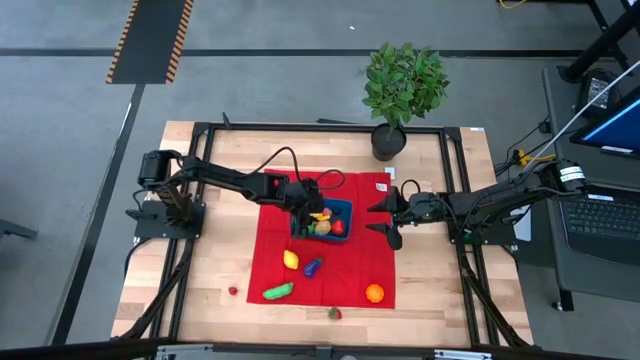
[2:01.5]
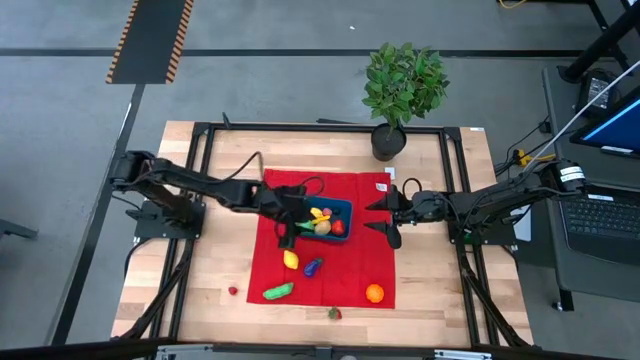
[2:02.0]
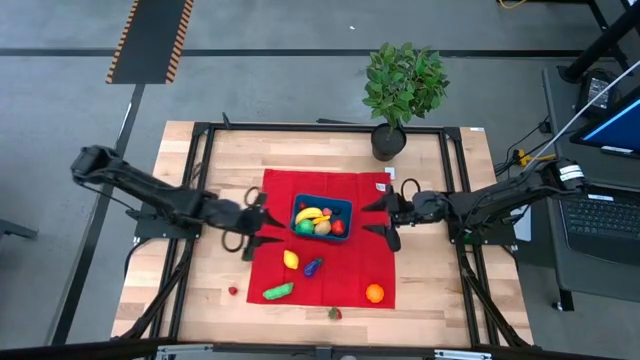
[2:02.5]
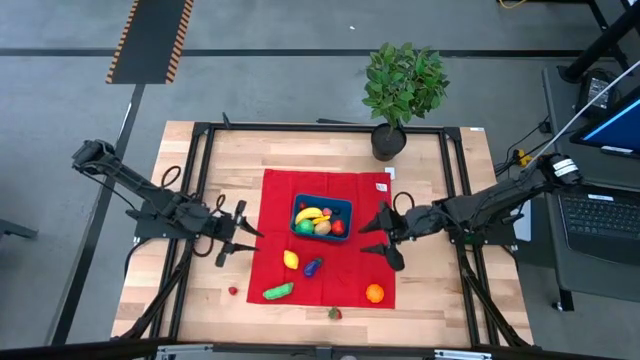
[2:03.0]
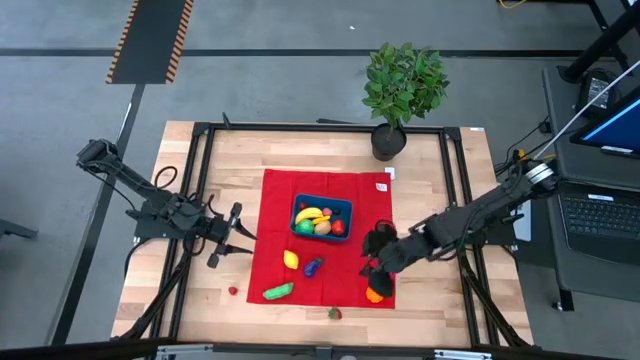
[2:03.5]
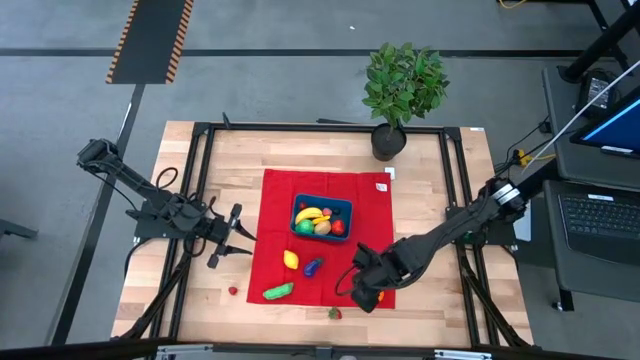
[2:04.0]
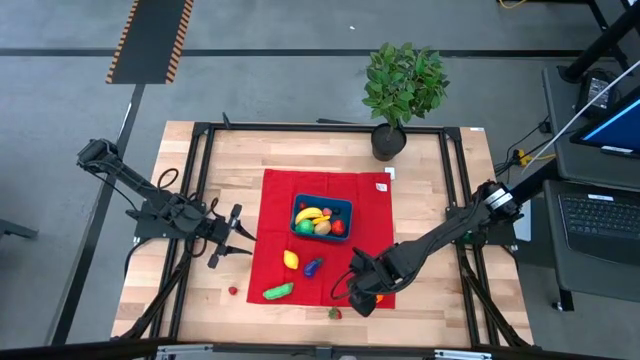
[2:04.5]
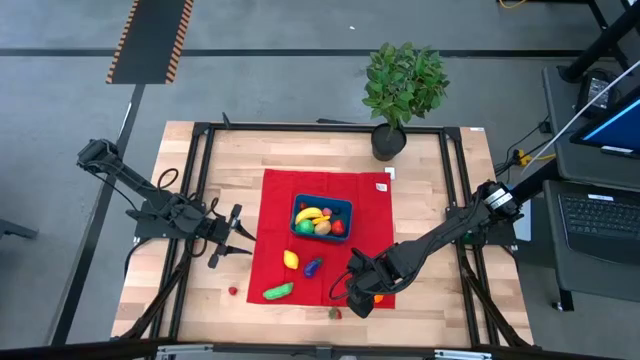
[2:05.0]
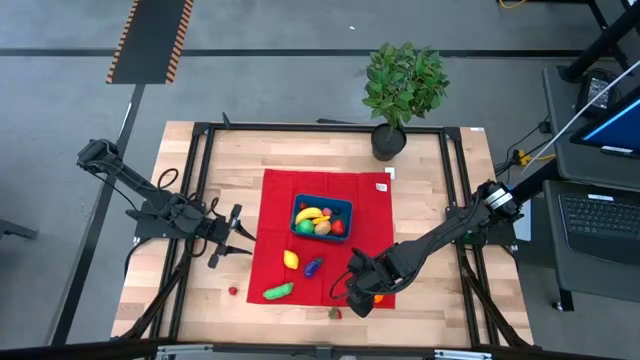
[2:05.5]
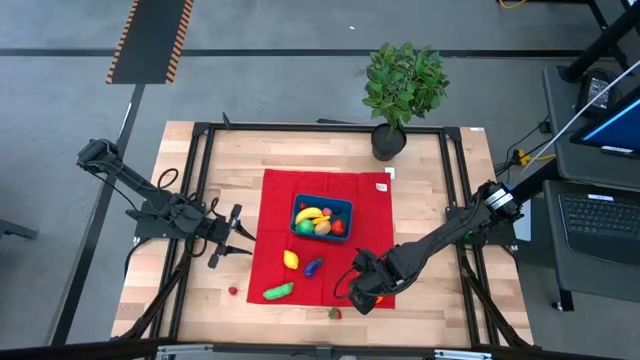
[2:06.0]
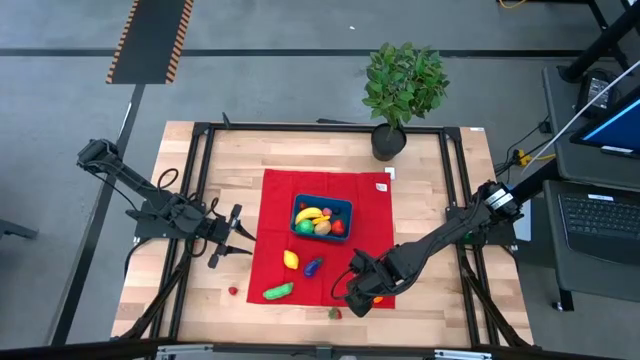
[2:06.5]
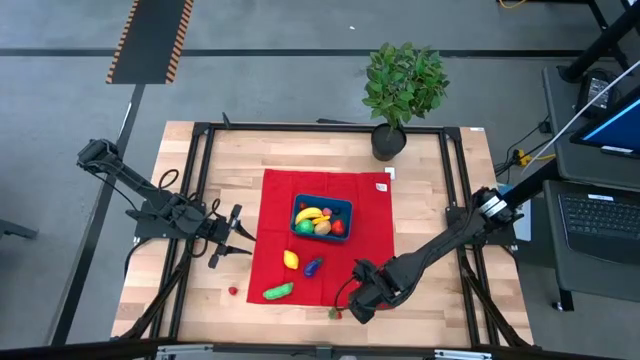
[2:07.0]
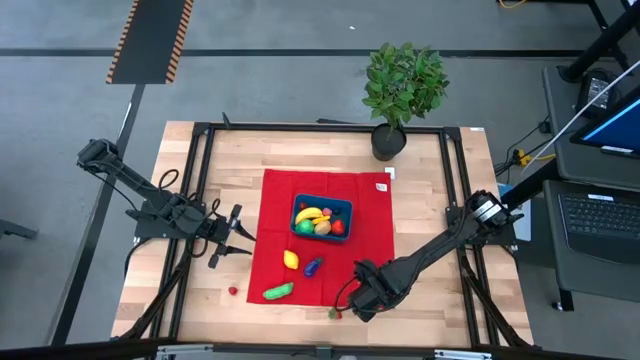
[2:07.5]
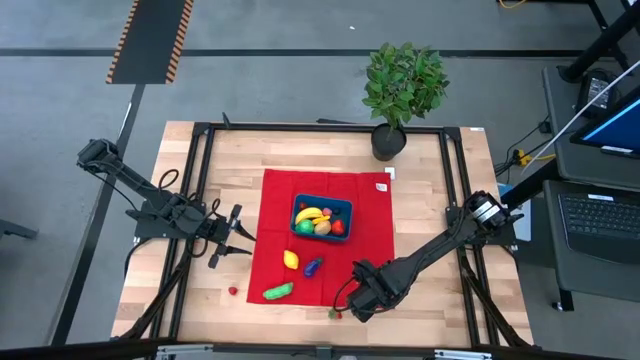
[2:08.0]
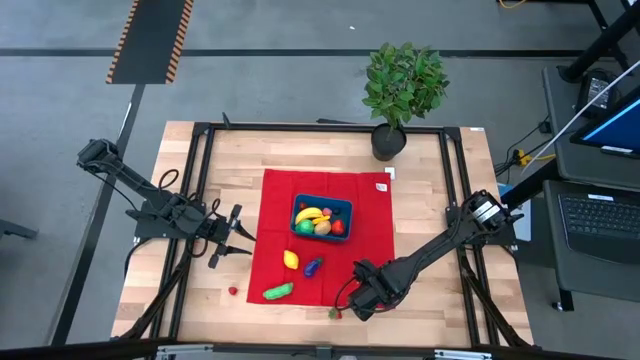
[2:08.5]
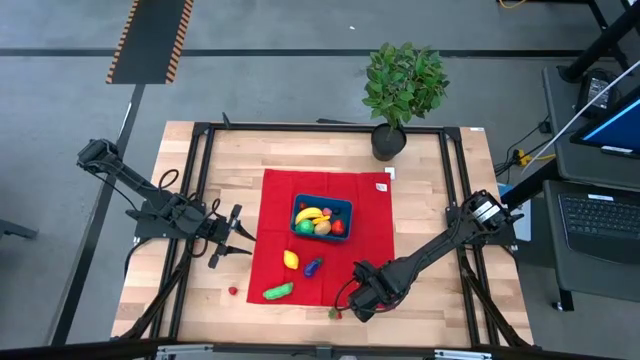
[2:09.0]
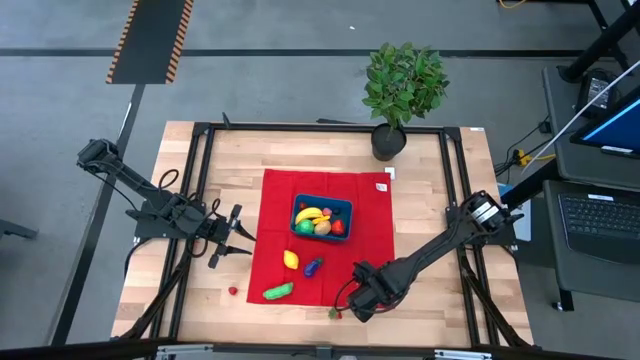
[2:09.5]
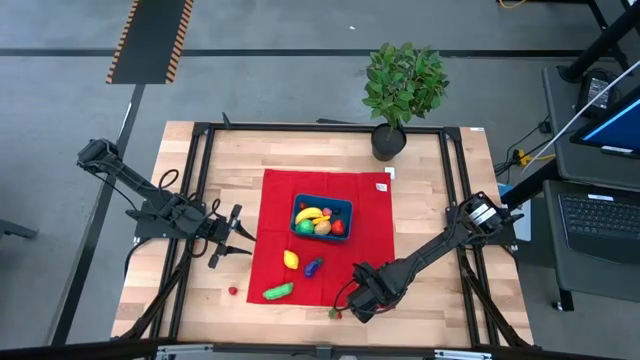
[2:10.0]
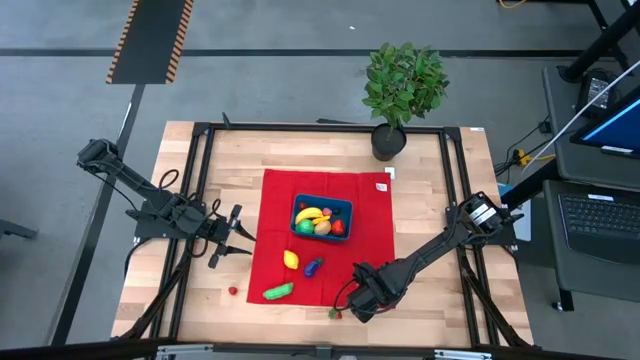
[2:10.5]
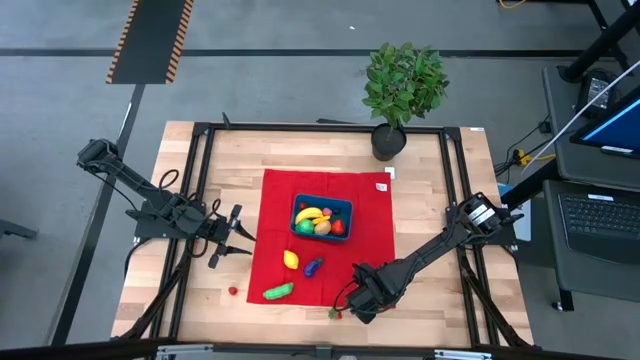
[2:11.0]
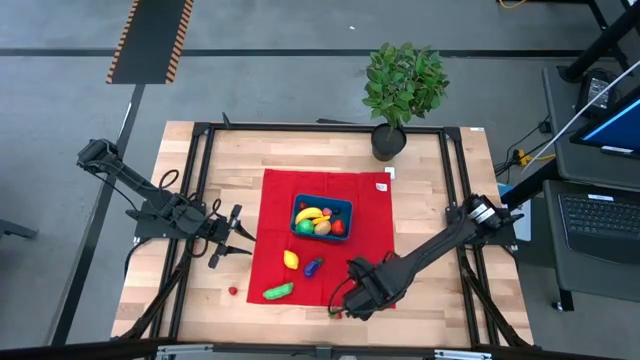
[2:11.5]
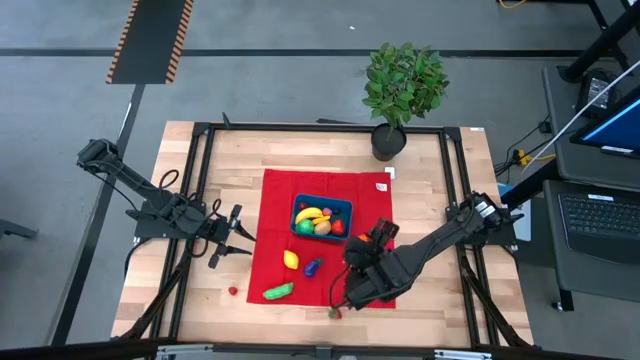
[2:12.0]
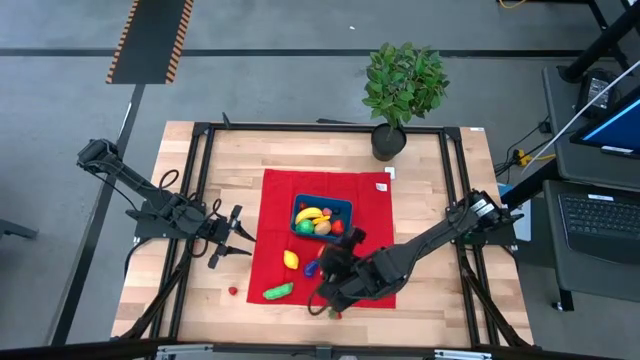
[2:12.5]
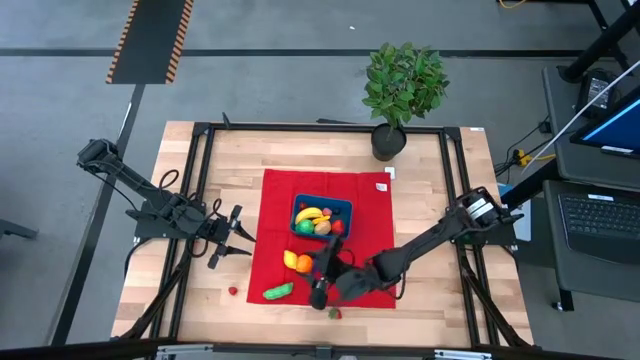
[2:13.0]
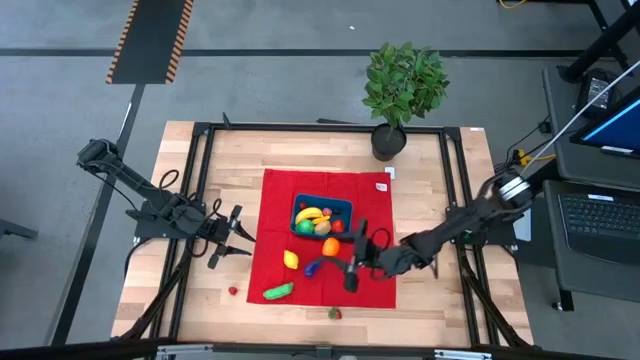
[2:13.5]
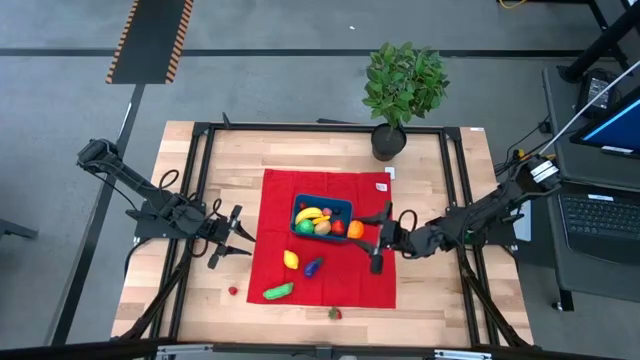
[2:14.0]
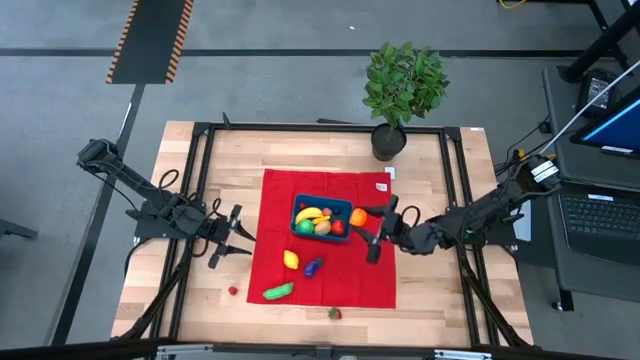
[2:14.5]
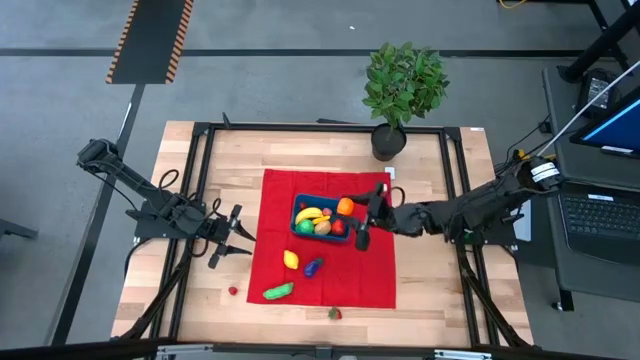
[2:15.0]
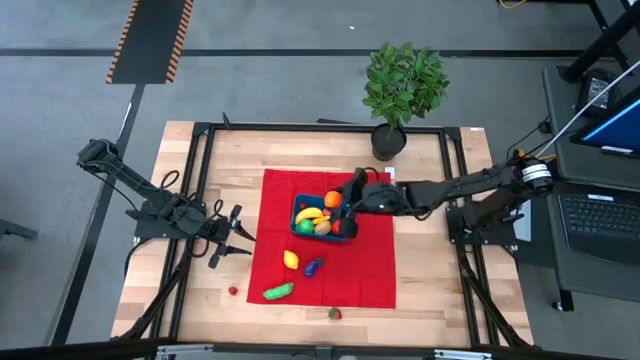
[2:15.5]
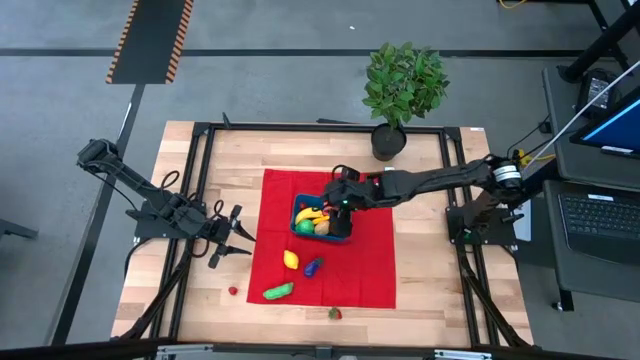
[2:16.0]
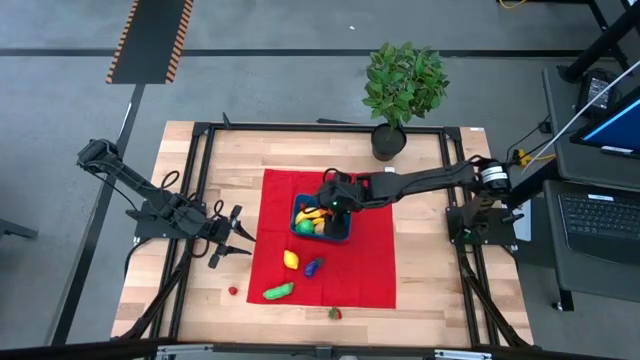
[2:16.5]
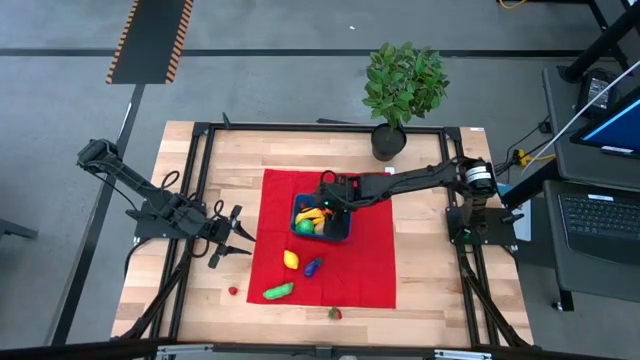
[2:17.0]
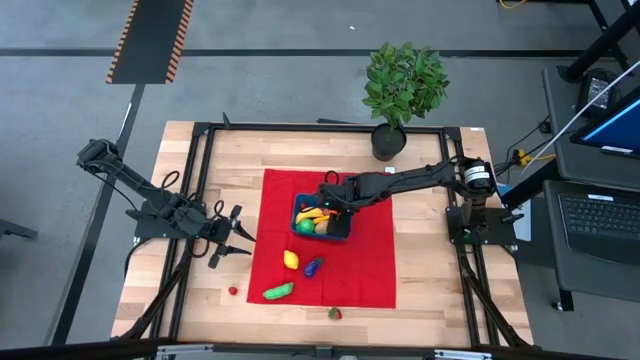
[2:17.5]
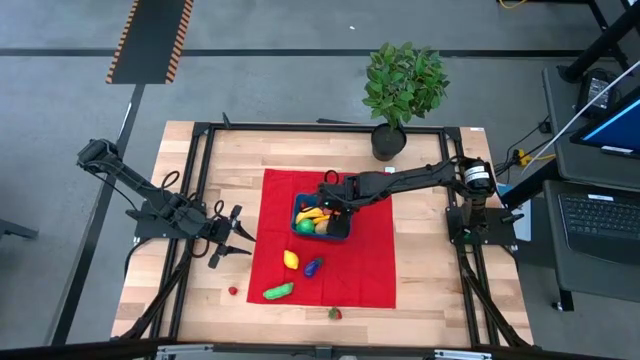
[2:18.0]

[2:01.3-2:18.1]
Task: Pick and placing Produce into tupperware
Put the orange tangerine into the blue bin

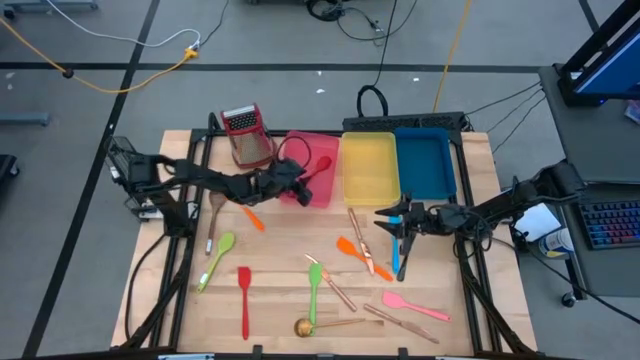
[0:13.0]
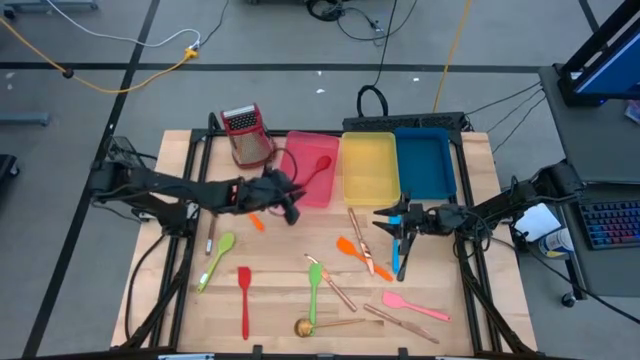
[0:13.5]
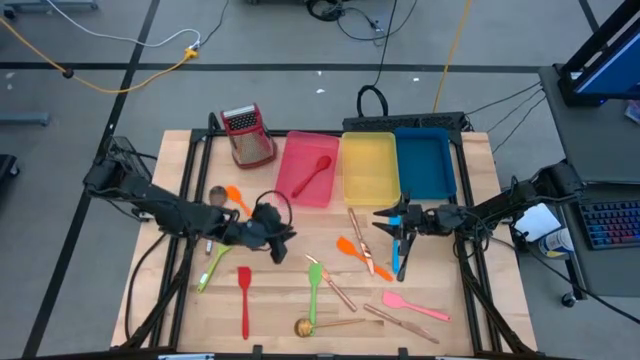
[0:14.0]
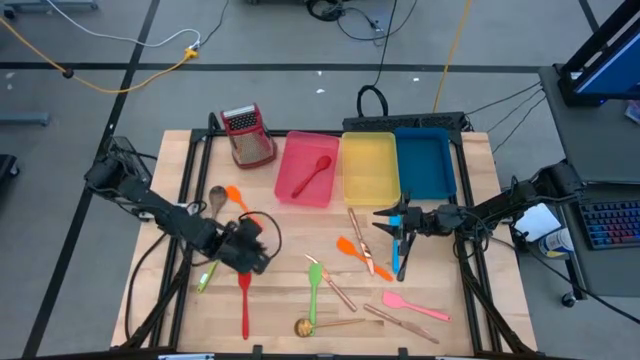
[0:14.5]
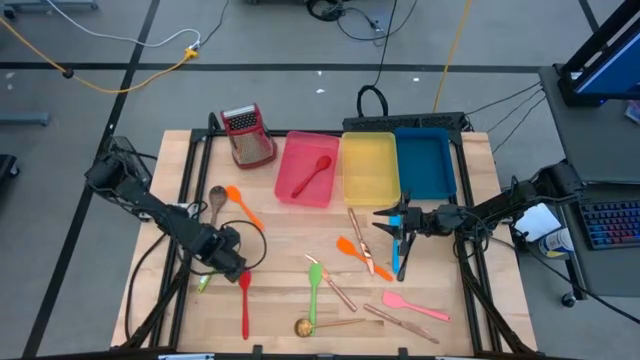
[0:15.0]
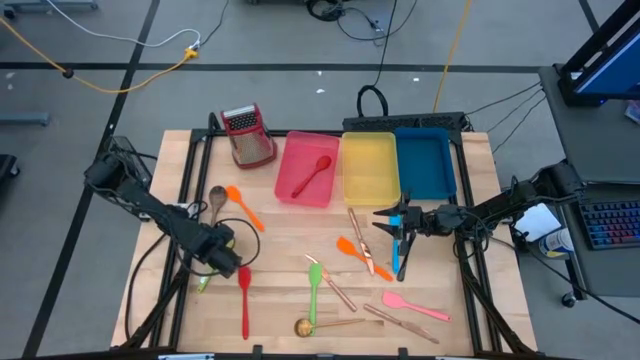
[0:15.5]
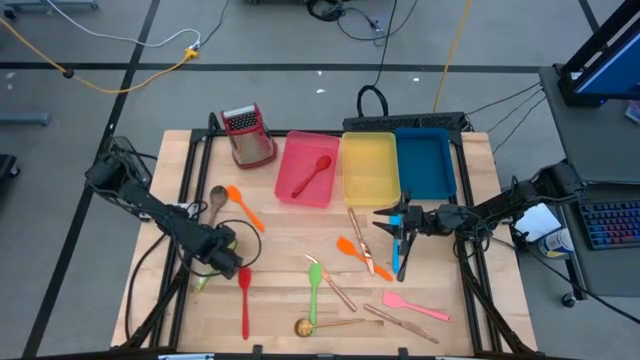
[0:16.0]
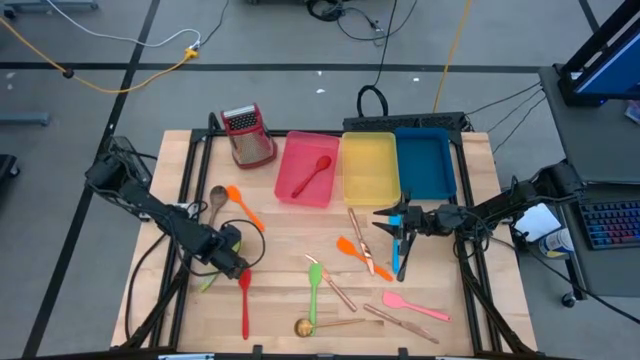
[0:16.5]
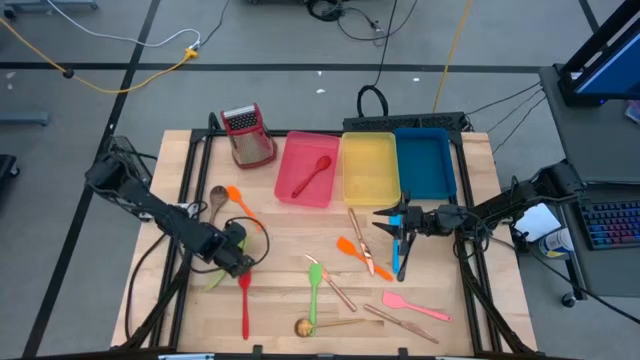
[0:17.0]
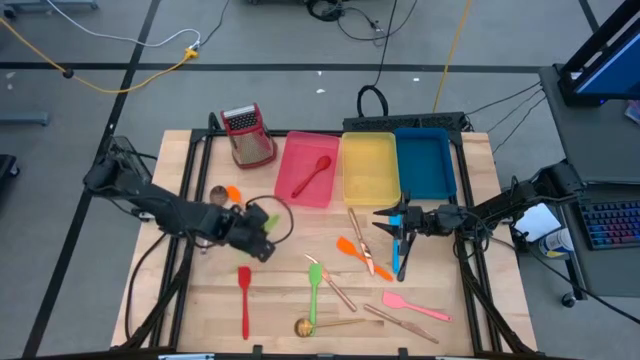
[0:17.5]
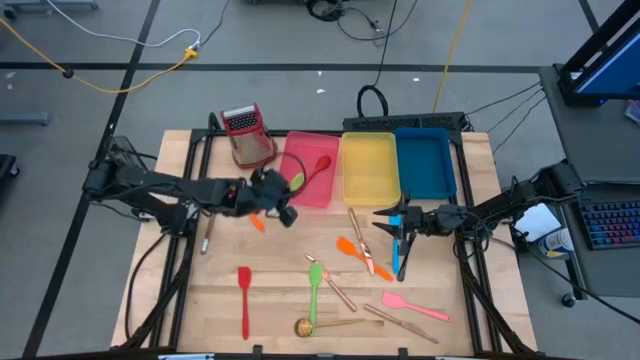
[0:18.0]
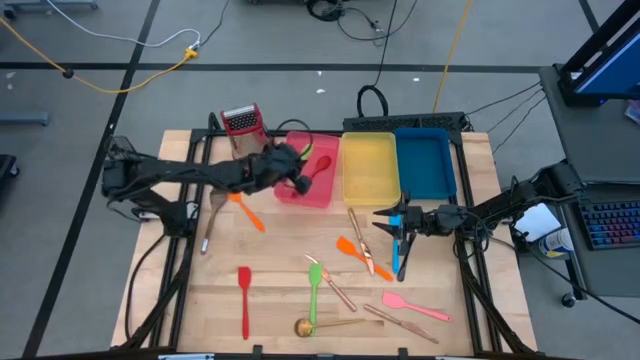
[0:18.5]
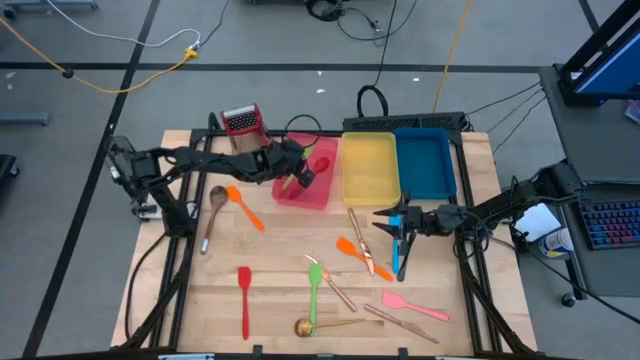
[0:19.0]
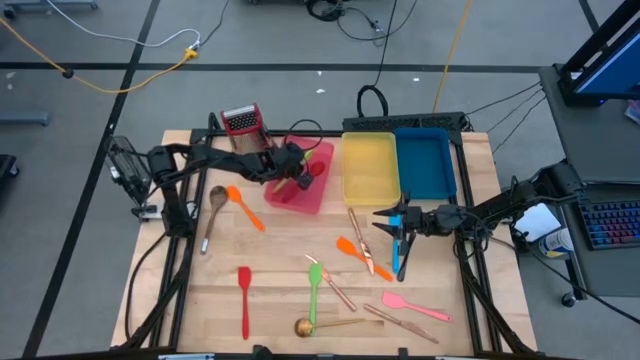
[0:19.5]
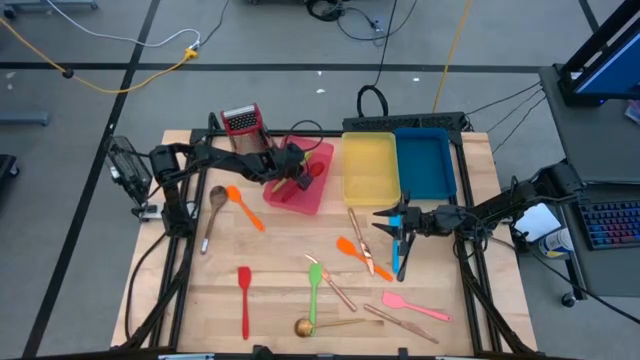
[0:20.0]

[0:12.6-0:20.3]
Task: Pick & Place Kitchen Items
Put the light green serving spoon into the red bin
